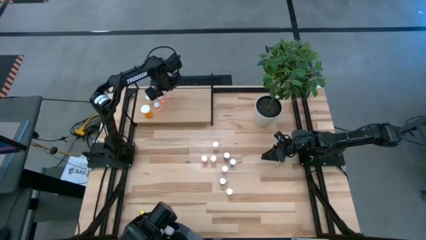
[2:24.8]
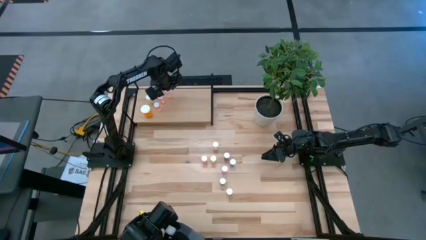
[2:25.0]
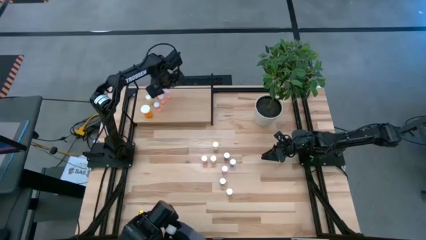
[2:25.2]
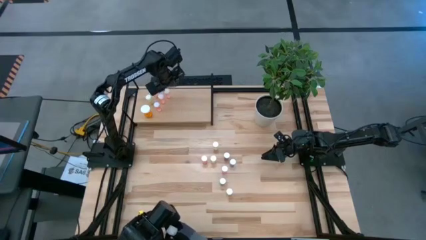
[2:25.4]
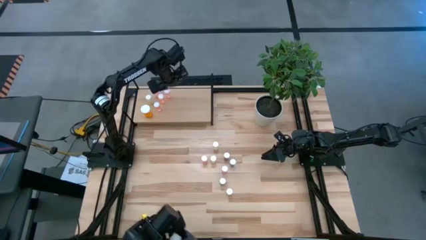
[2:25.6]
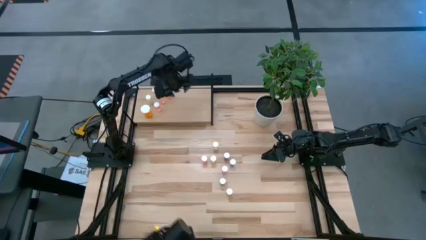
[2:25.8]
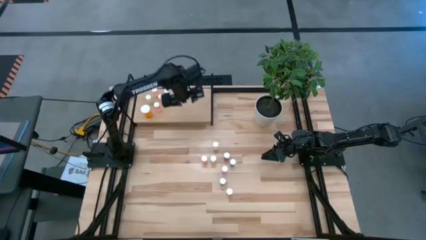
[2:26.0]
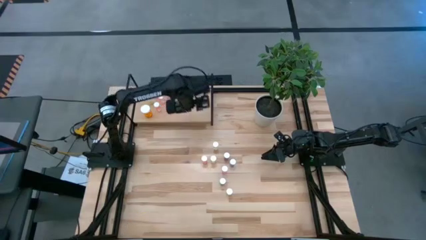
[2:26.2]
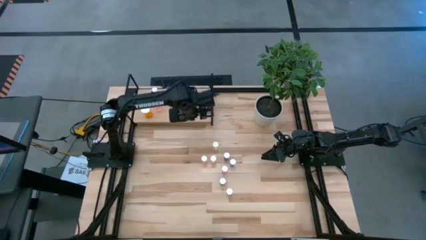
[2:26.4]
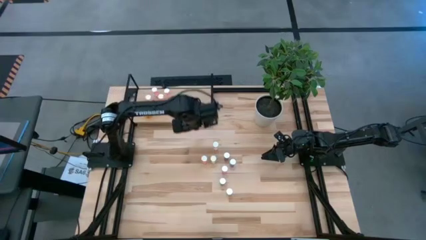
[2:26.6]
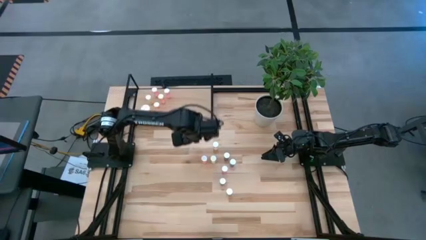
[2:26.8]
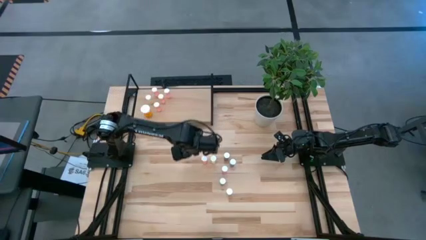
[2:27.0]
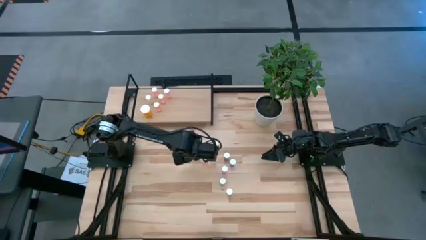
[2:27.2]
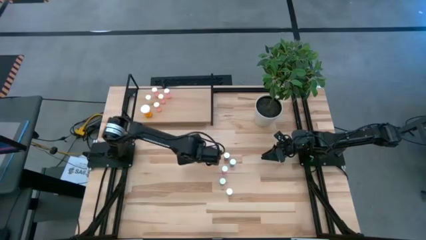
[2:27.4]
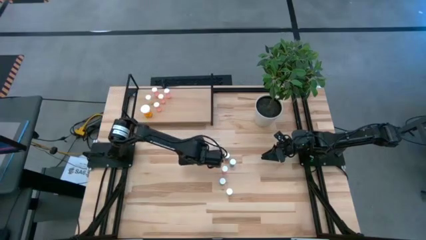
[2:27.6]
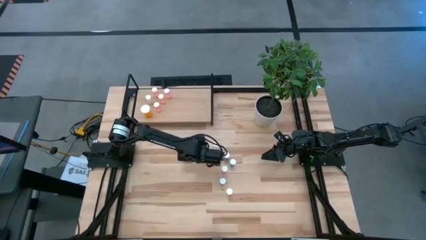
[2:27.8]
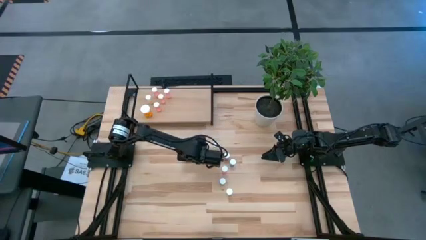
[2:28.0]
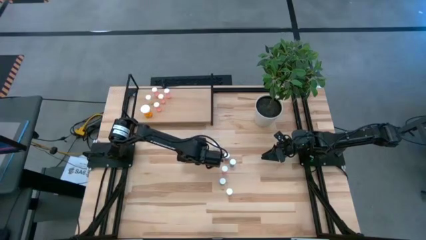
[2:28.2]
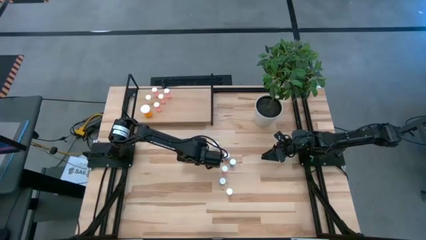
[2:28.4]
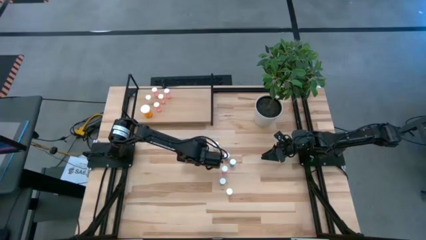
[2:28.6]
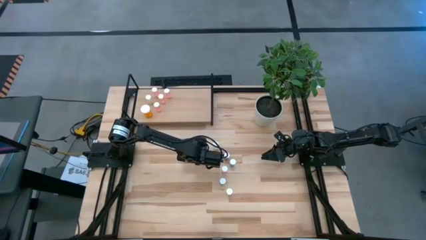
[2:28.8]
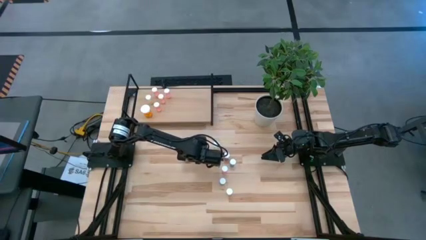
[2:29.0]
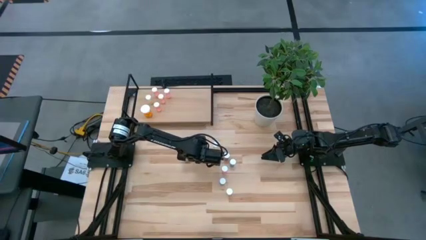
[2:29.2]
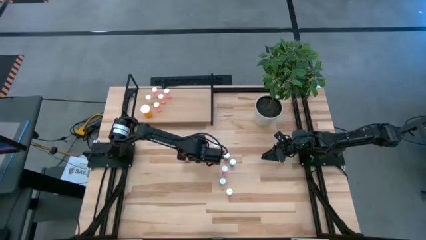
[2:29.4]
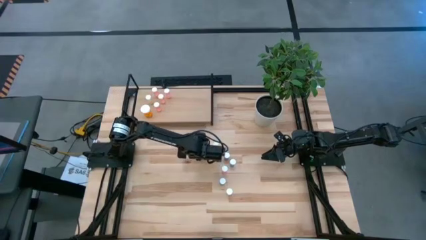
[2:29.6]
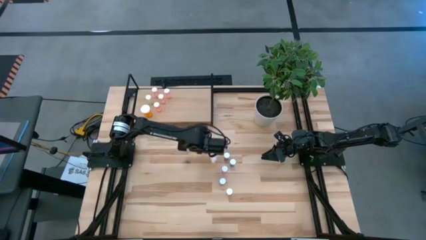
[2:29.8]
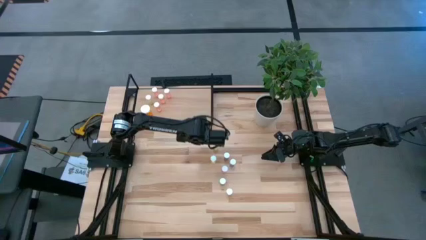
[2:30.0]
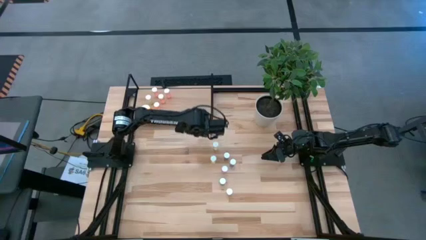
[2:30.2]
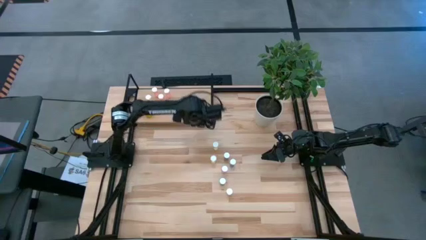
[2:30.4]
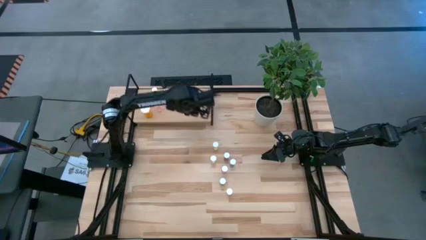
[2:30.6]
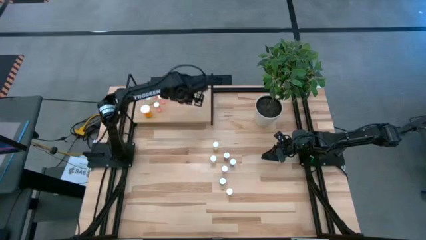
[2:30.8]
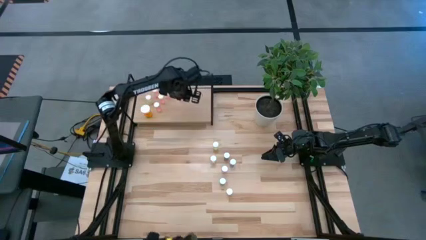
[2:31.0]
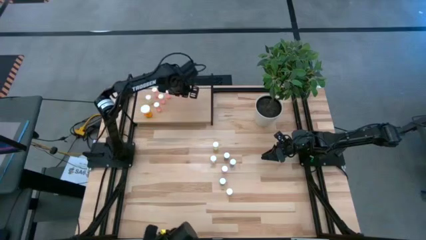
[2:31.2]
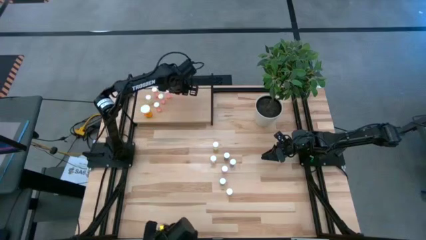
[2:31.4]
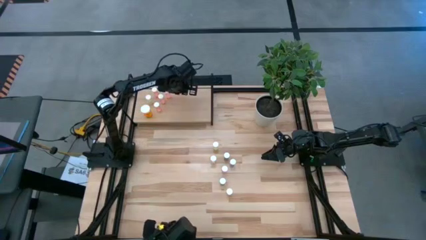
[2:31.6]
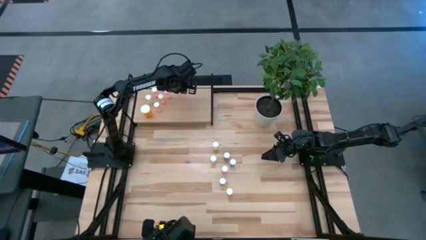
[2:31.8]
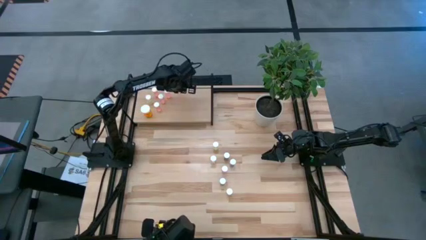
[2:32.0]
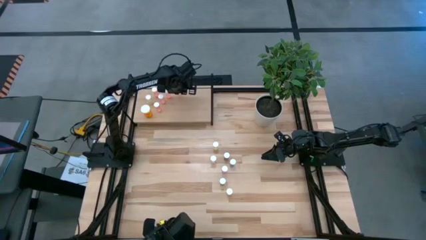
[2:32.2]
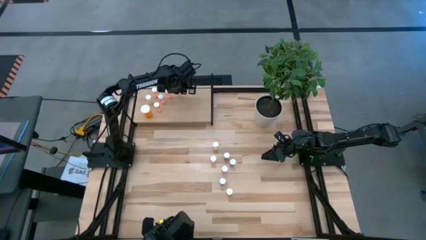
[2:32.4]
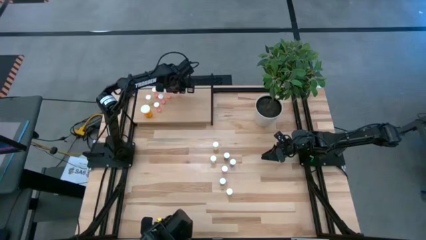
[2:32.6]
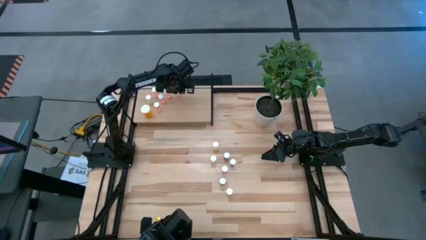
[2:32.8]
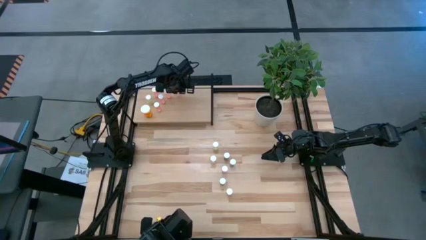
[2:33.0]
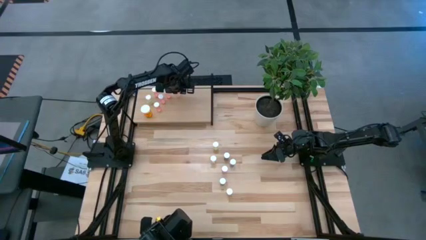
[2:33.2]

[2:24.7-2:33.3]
Task: Pick and place medicine bottles onto shelf by color
Put the orange pill bottle on the shelf

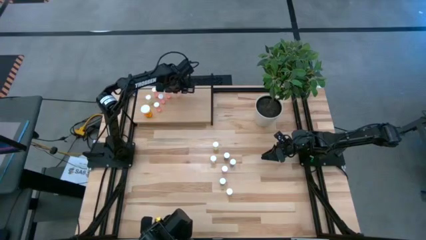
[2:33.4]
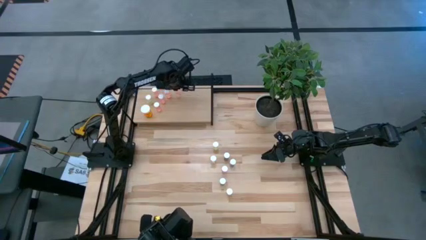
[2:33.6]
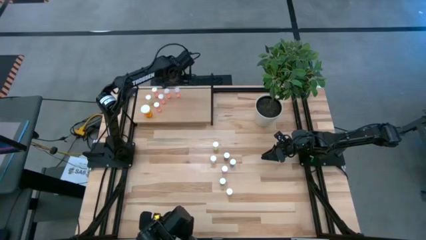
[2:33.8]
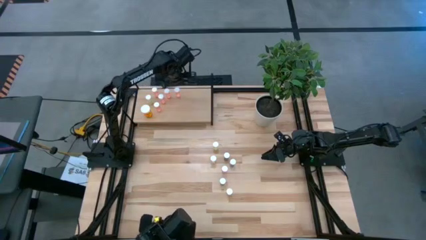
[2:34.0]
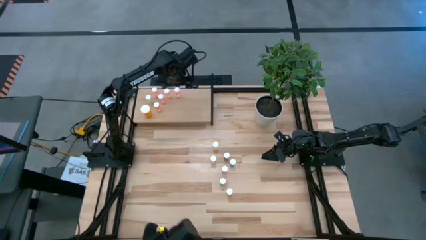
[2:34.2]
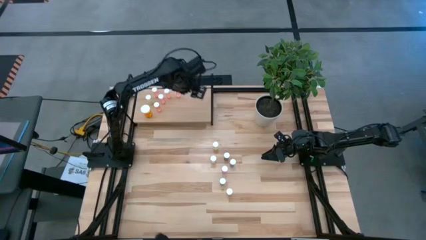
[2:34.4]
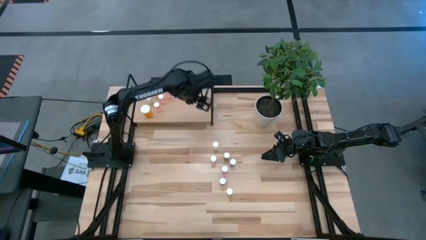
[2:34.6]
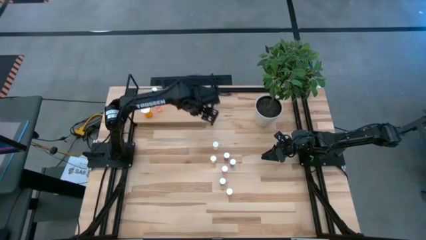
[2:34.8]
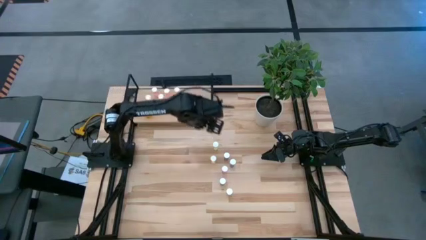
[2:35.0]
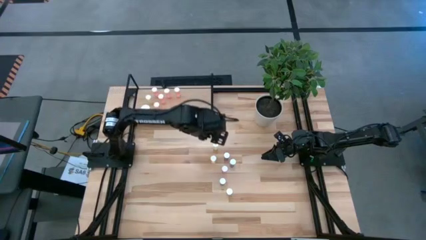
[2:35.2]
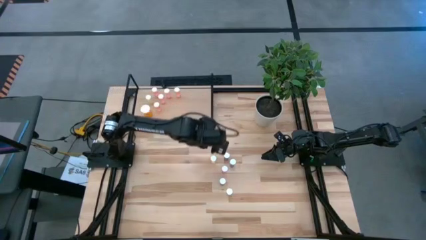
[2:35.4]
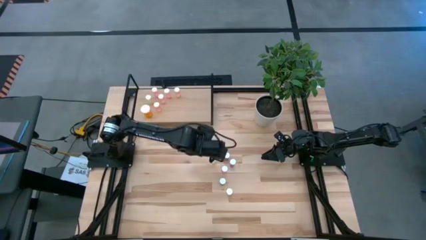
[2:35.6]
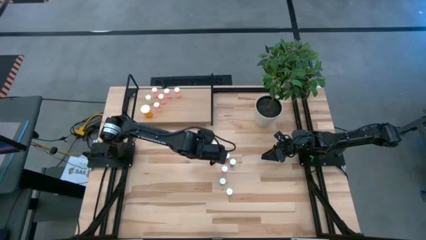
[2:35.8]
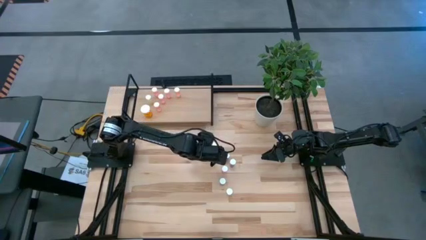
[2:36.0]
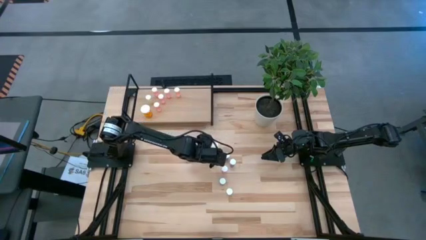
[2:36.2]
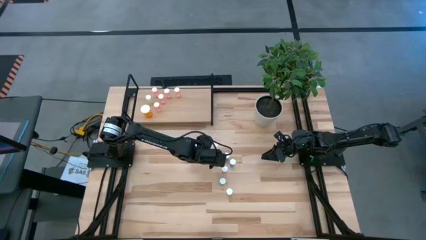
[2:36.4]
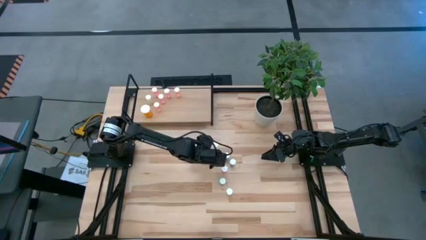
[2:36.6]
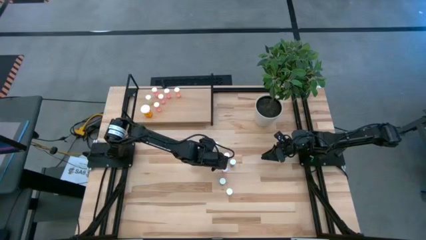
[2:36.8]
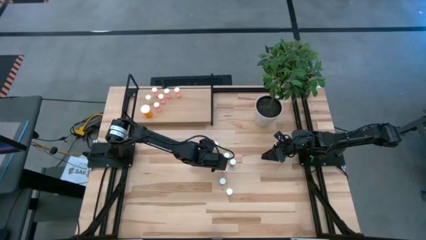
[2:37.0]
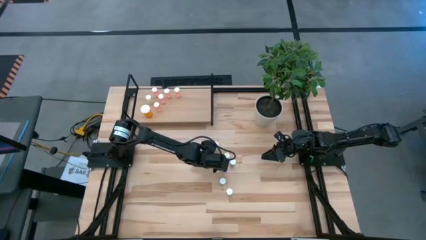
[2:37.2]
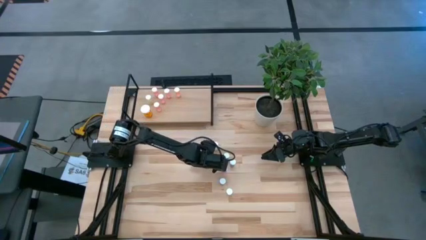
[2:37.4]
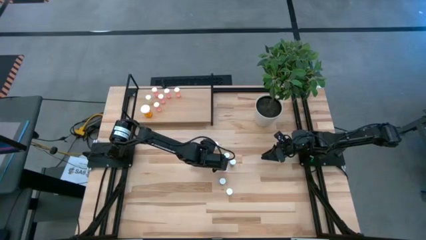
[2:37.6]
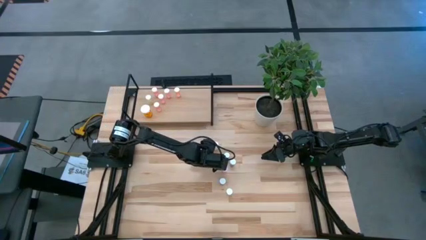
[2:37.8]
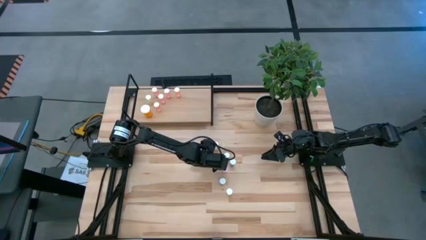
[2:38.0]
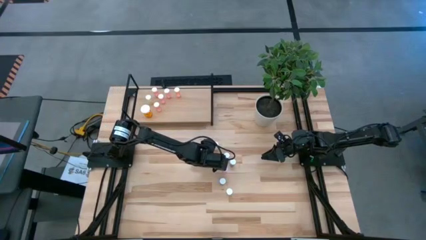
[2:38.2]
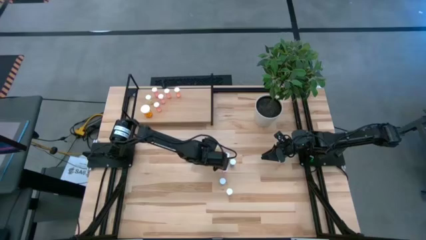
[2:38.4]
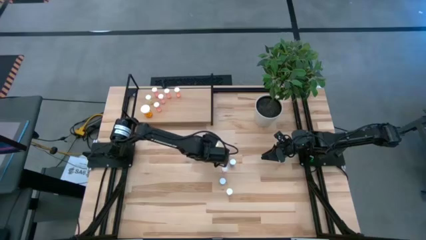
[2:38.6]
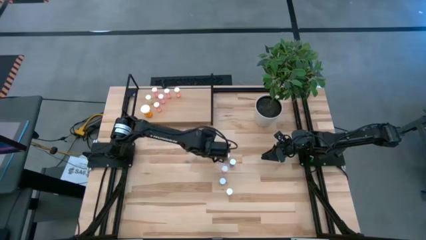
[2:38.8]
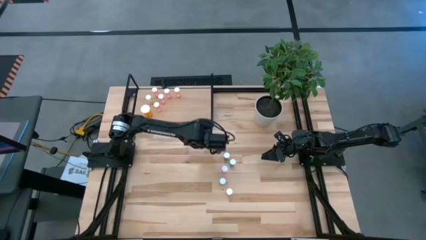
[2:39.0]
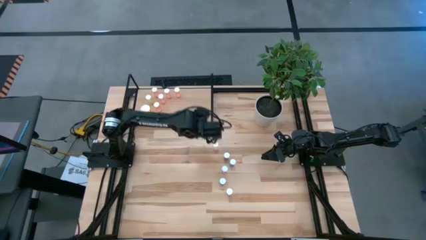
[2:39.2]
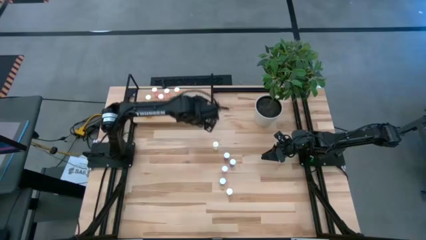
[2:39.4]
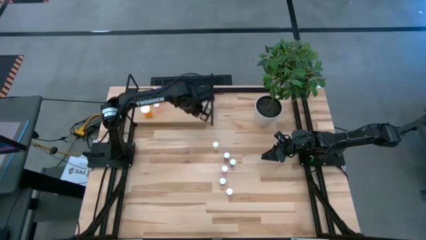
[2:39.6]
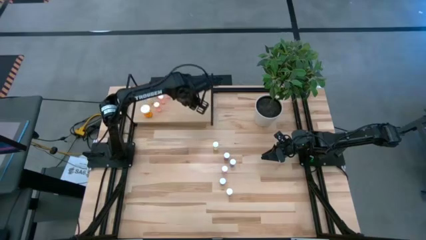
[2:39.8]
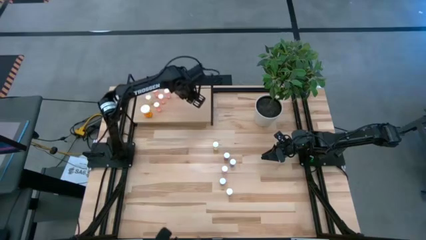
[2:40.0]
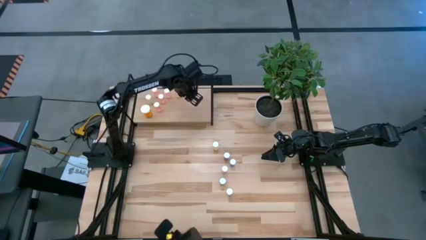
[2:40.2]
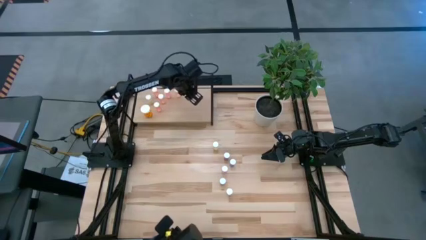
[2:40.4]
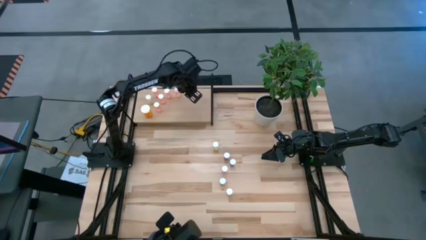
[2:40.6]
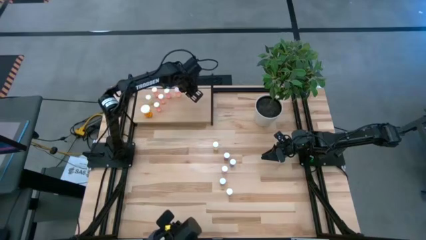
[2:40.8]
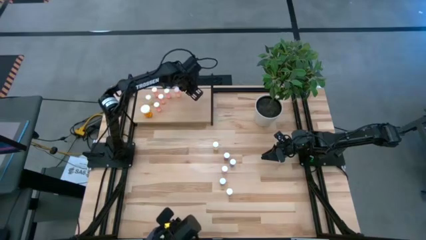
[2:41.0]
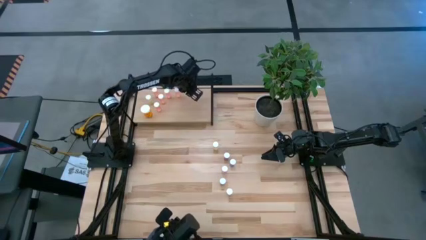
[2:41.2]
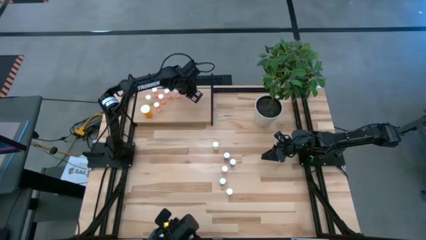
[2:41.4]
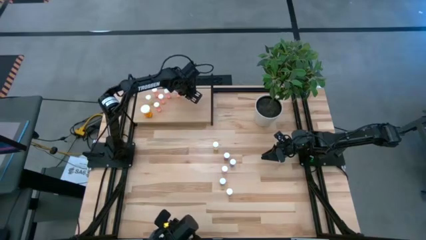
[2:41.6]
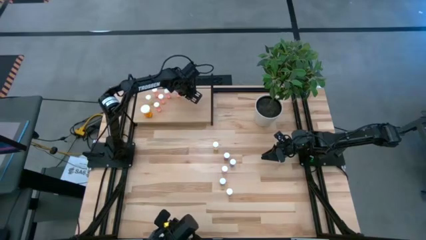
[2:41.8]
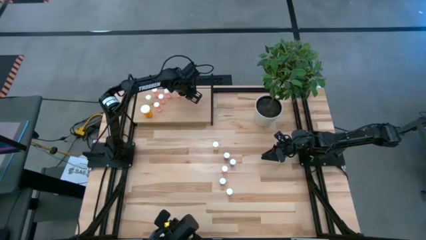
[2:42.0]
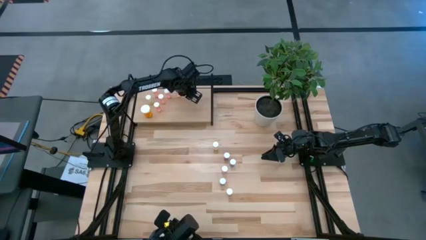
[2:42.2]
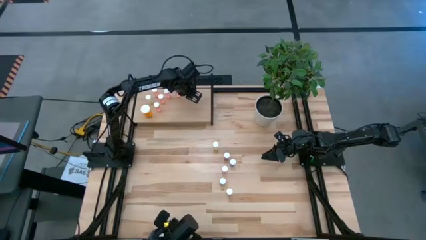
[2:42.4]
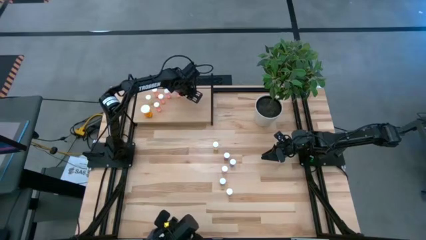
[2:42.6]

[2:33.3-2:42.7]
Put the pink pill bottle on the shelf
